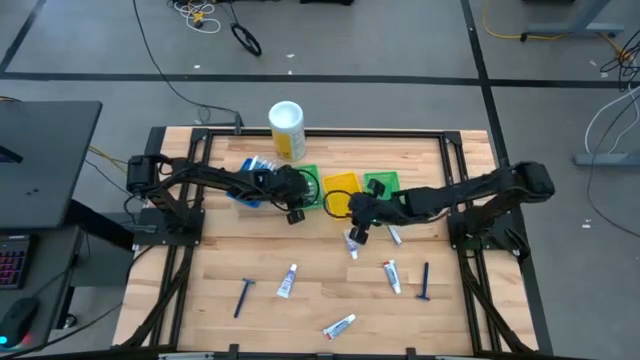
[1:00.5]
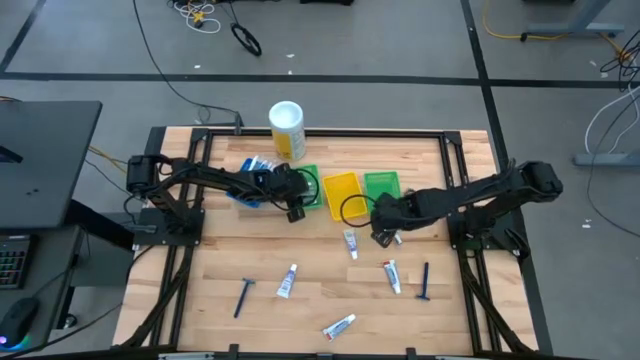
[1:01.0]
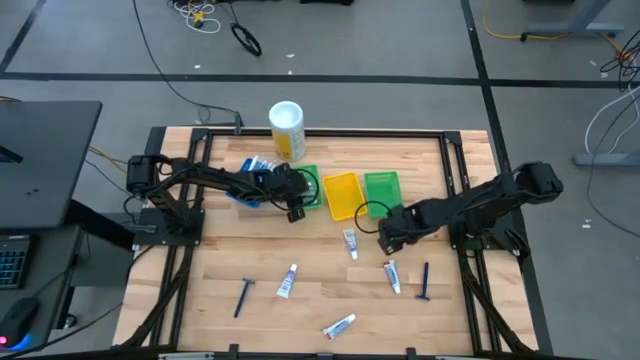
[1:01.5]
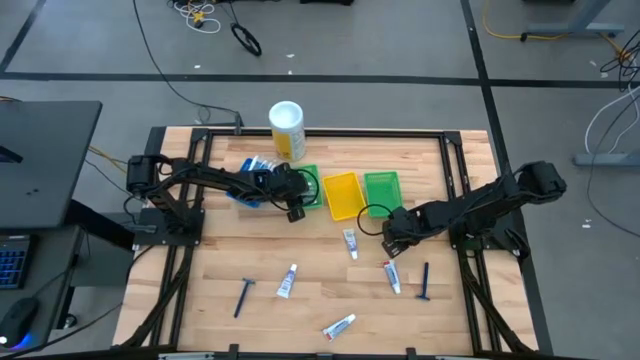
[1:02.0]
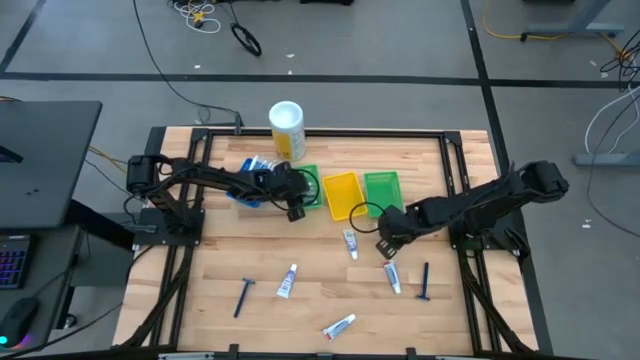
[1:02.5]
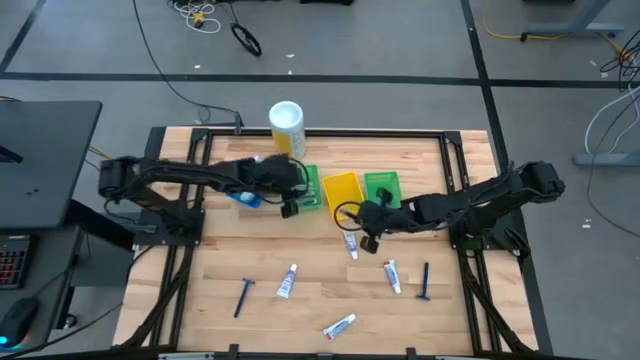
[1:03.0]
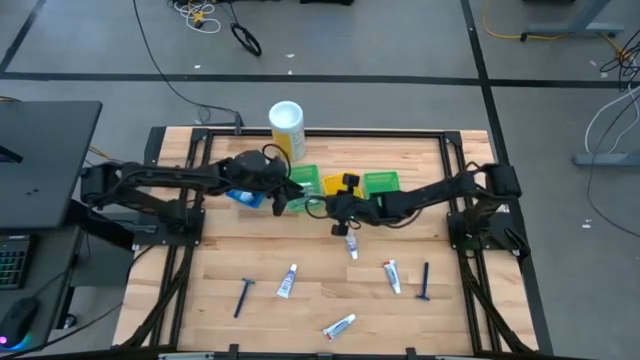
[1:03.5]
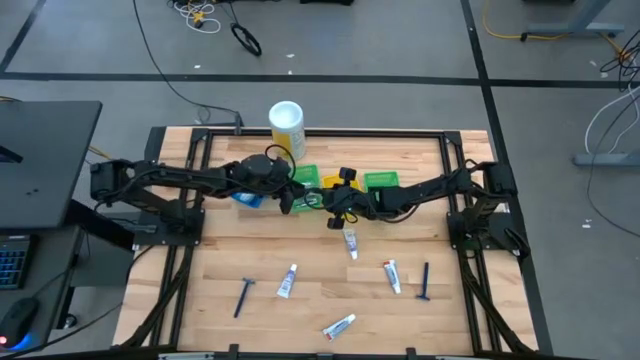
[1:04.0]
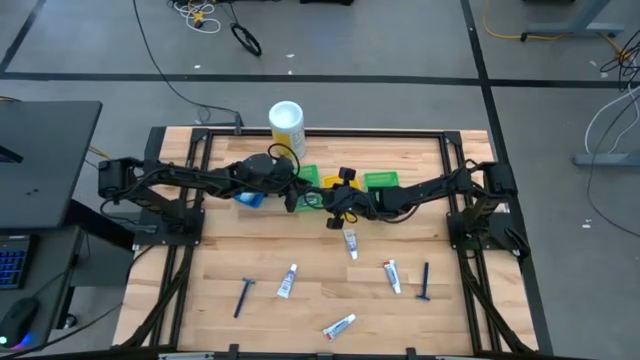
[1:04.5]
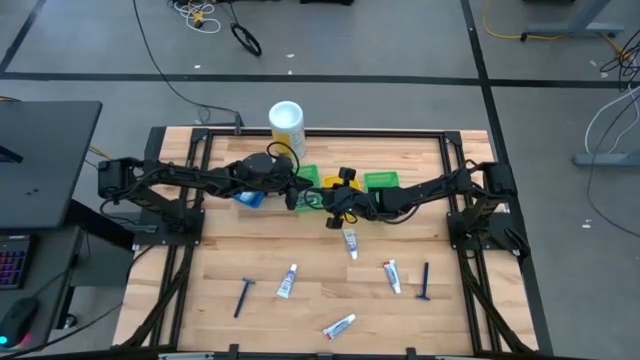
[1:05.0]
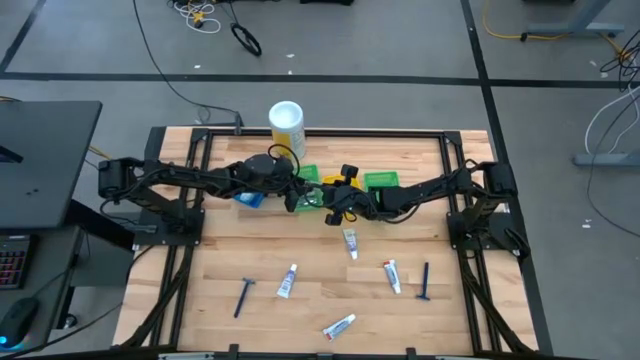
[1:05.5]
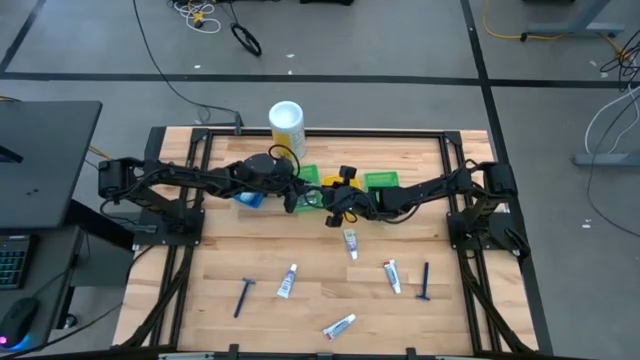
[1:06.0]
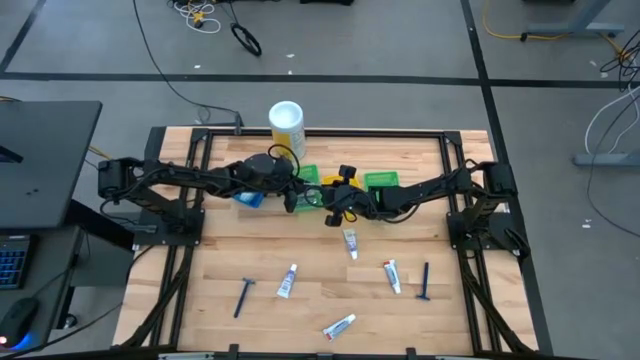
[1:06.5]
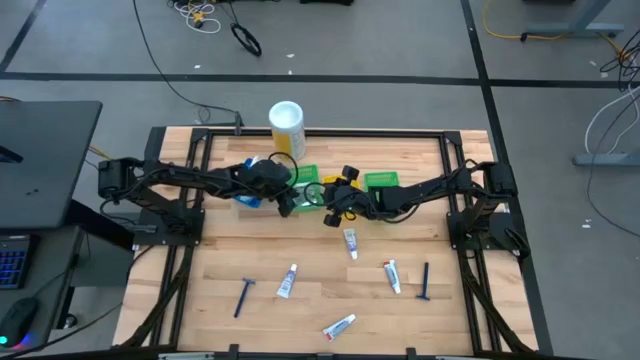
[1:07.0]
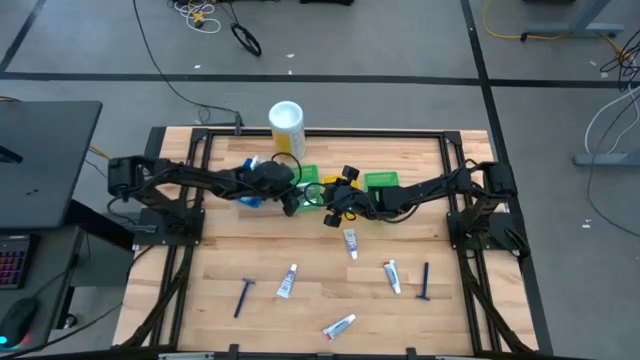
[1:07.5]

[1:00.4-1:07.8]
Task: Pick & Place Travel size toiletries
Put the nailcutter into the left green bin

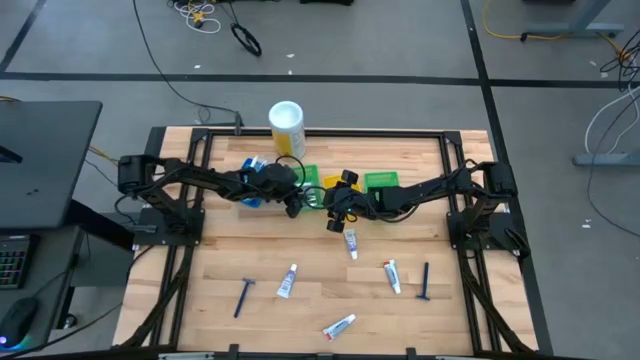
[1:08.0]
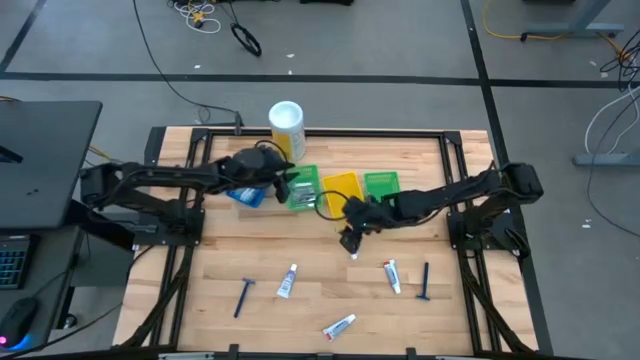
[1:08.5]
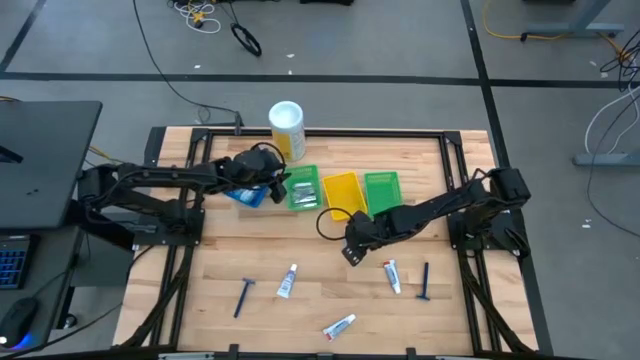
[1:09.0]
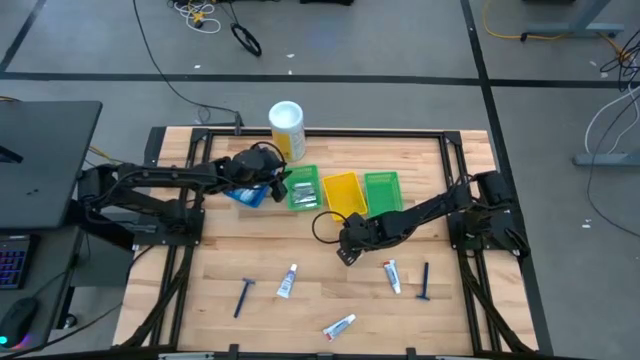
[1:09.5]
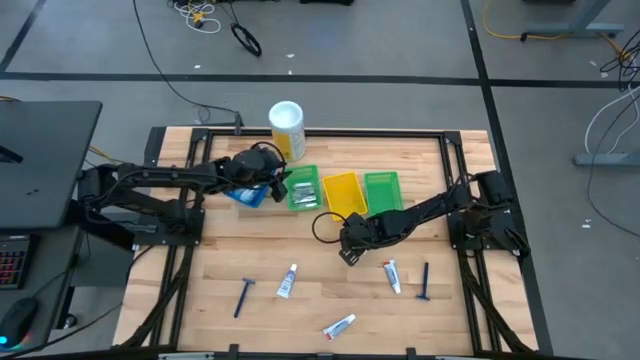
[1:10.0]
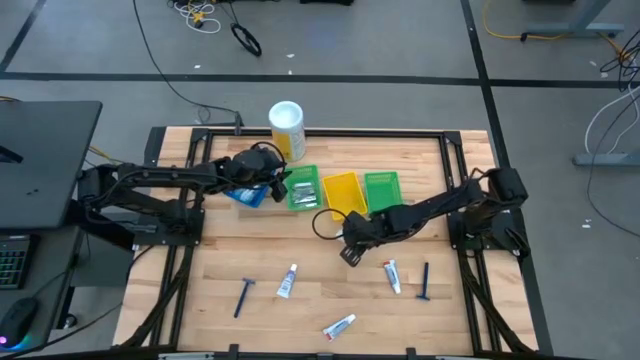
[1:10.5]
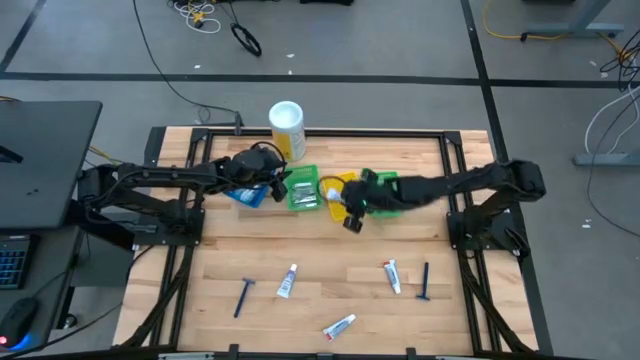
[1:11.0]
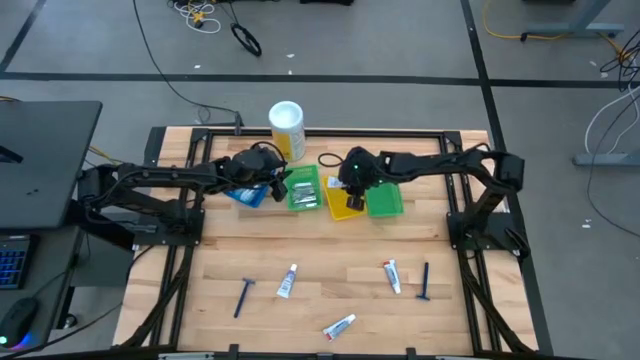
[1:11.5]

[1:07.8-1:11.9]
Put the toothpaste into the yellow bin

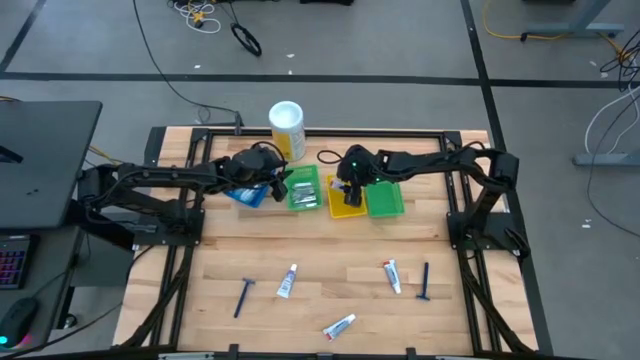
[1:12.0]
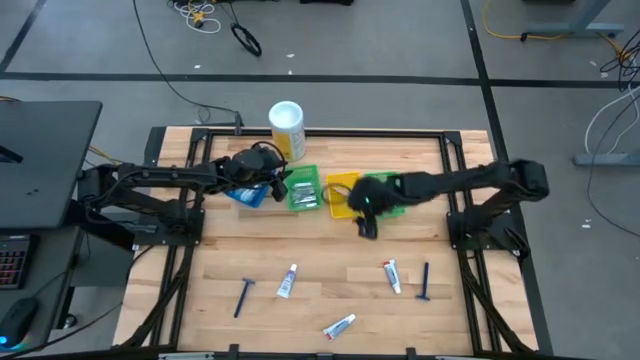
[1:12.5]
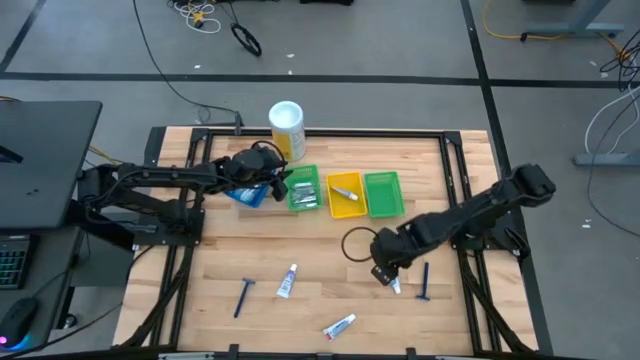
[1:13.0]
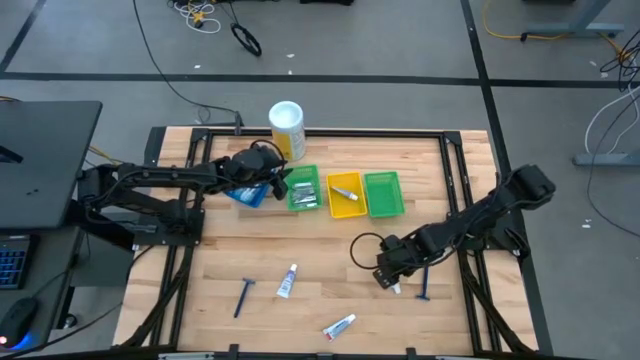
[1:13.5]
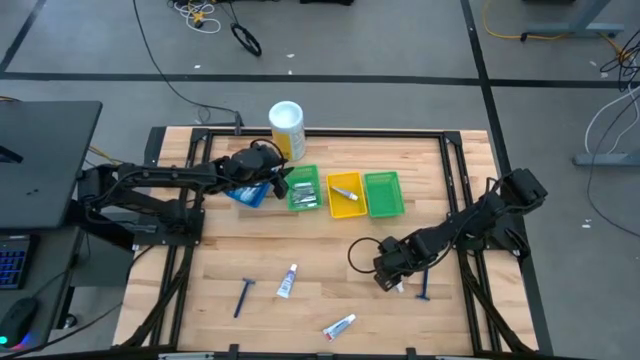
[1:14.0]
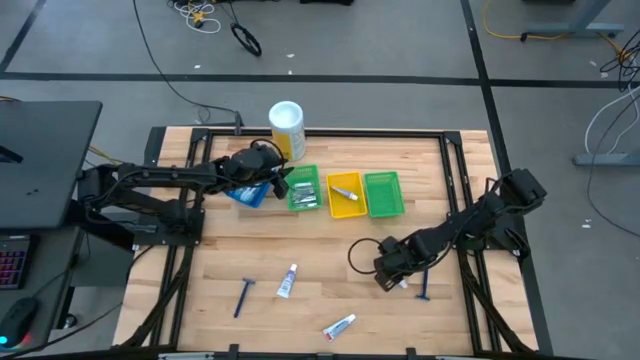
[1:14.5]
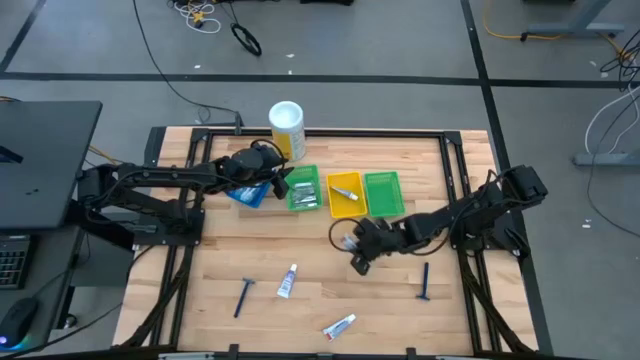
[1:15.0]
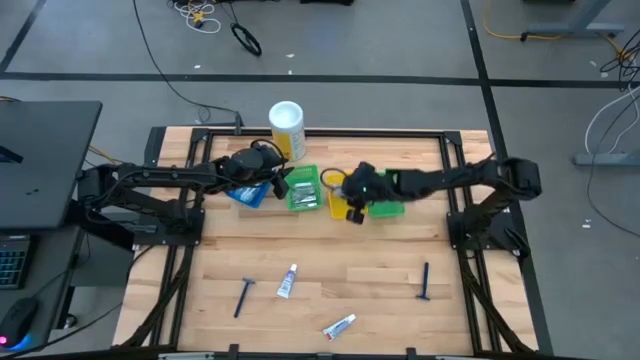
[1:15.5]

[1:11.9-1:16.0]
Put the toothpaste into the yellow bin

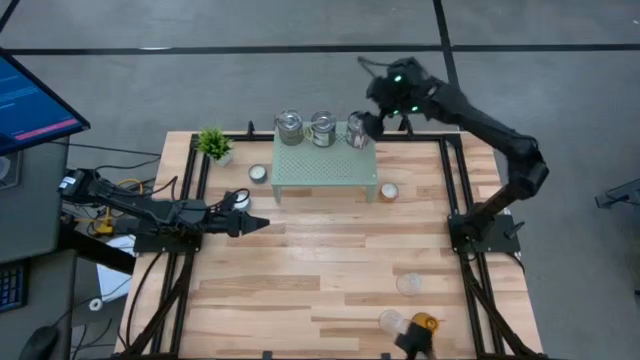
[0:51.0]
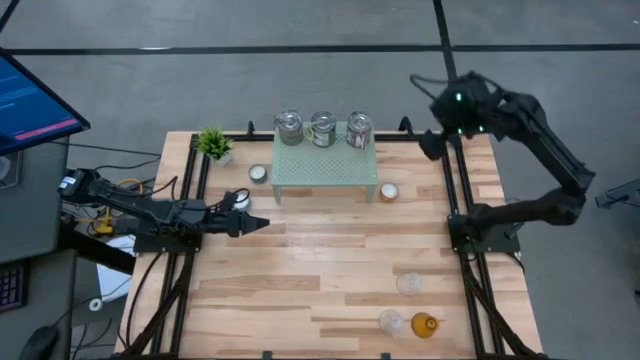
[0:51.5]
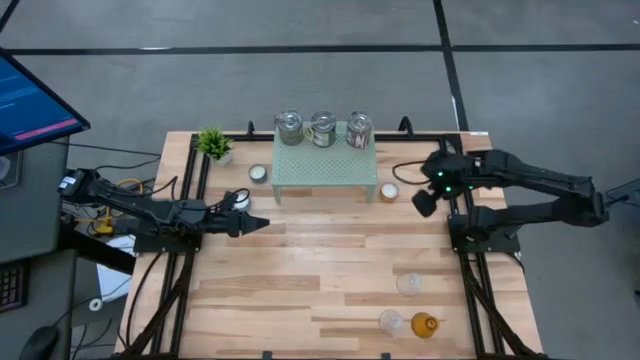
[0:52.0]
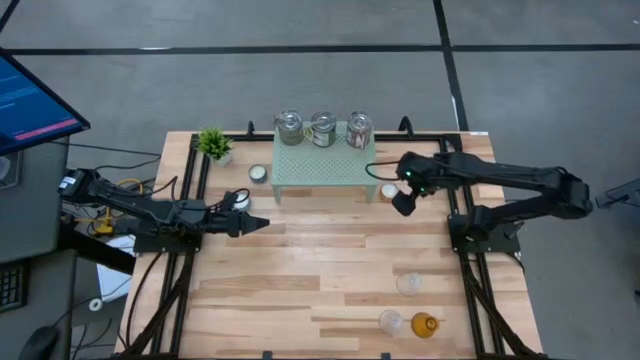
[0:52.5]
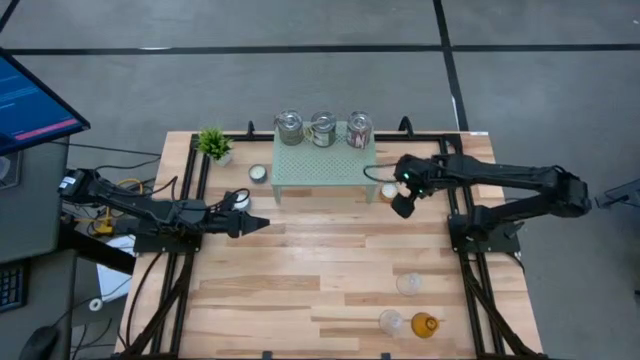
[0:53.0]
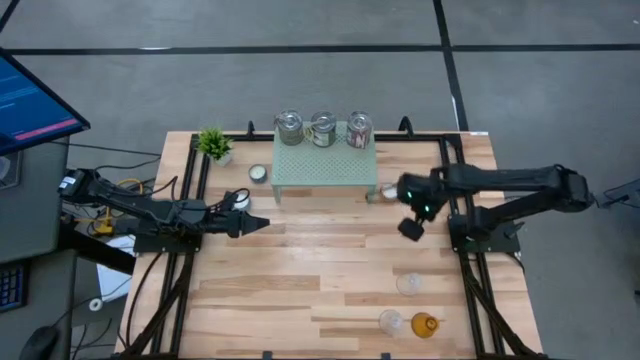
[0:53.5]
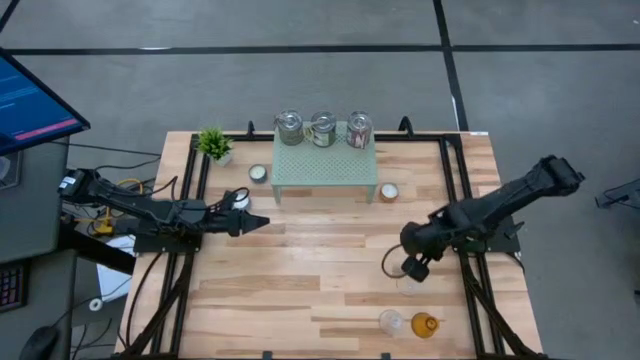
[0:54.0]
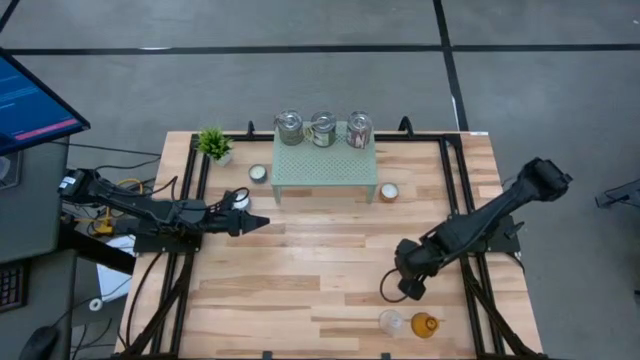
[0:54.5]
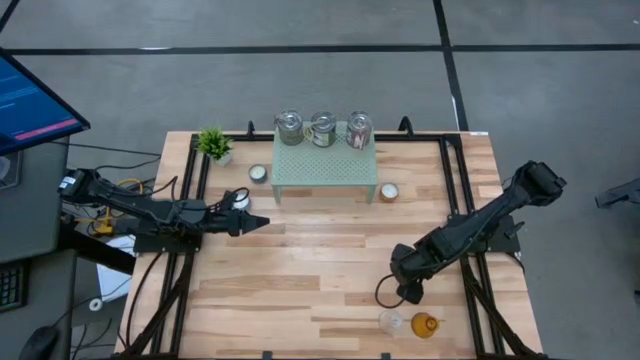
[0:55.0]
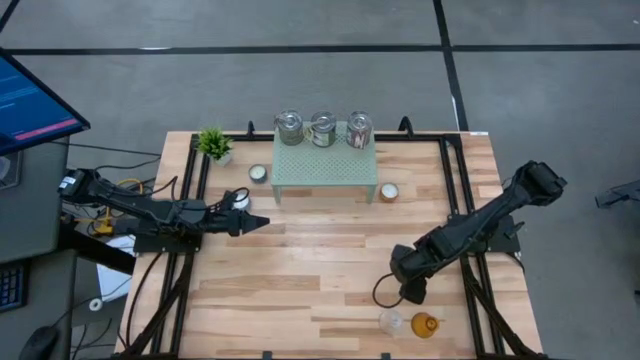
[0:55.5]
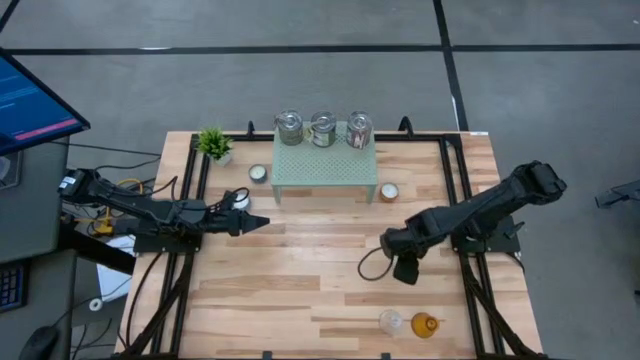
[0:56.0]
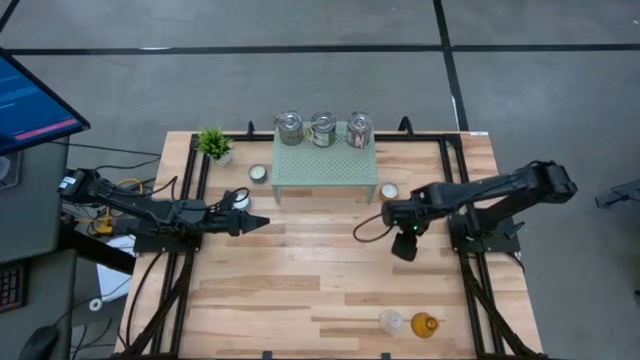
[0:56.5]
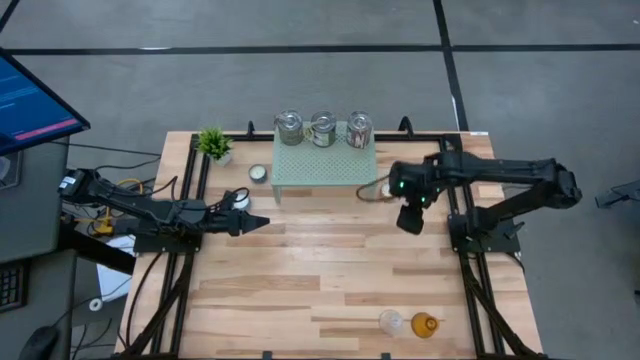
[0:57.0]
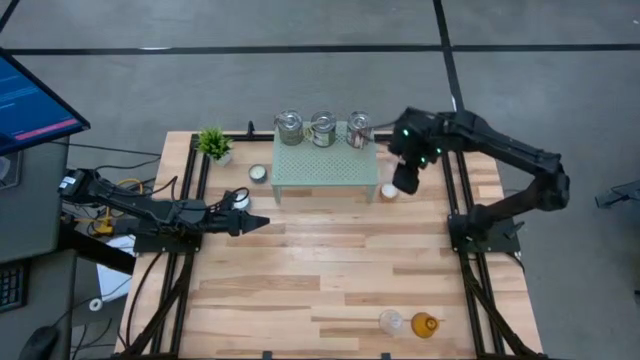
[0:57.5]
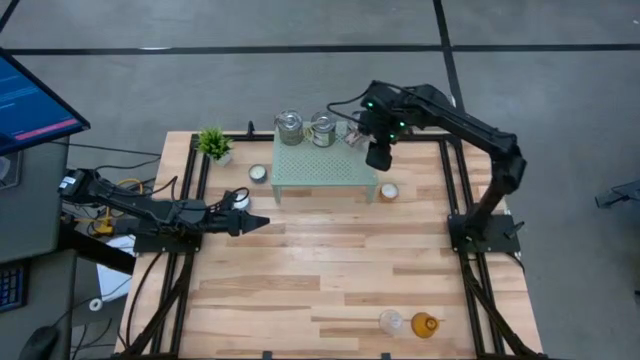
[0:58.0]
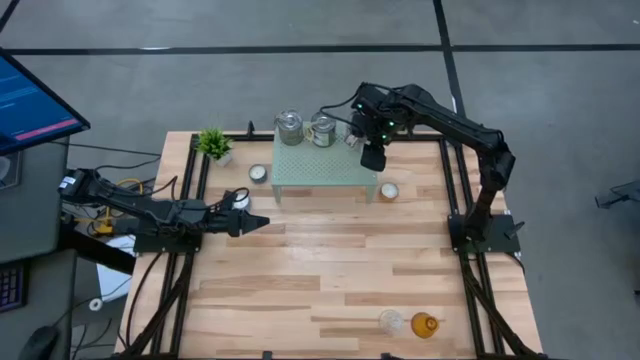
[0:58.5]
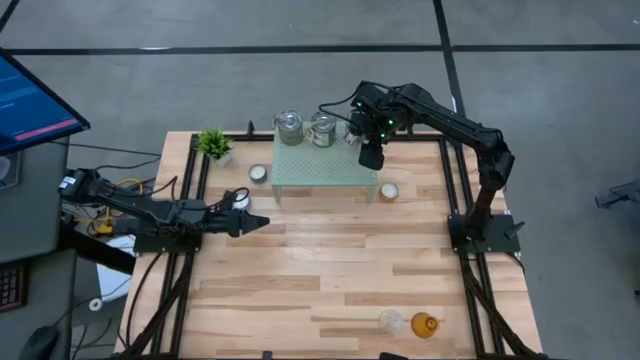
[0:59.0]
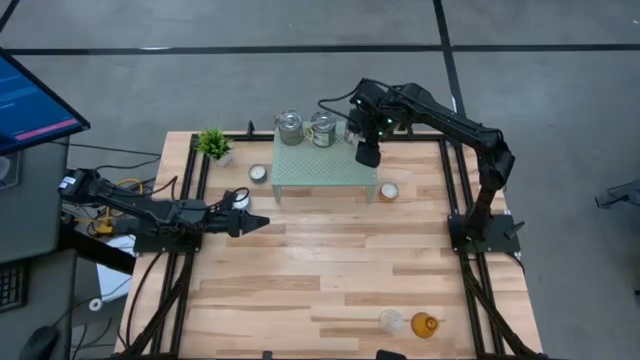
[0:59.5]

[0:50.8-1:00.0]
Task: Pick & Place candle stick holders
Put the top transparent candle holder on the shelf
